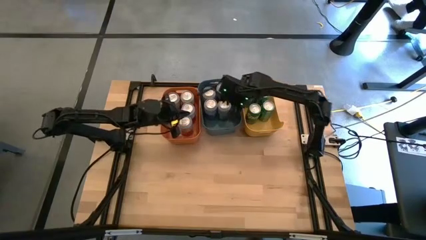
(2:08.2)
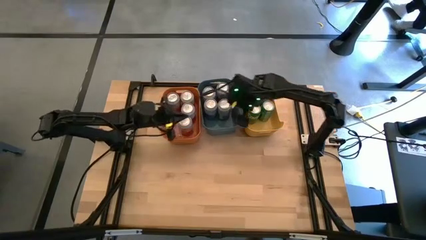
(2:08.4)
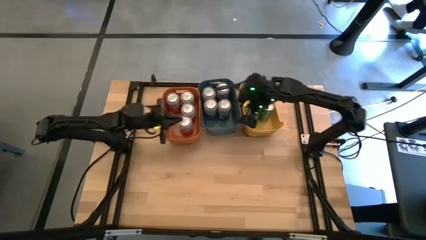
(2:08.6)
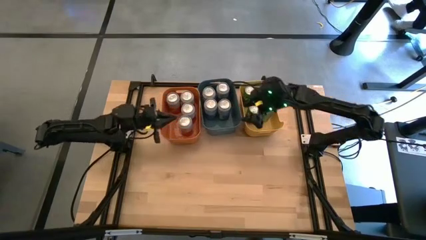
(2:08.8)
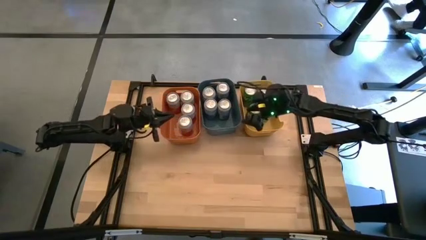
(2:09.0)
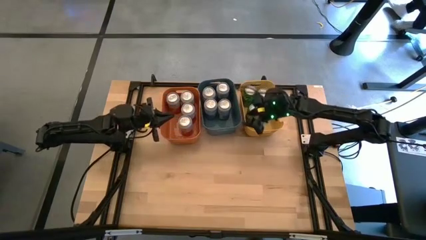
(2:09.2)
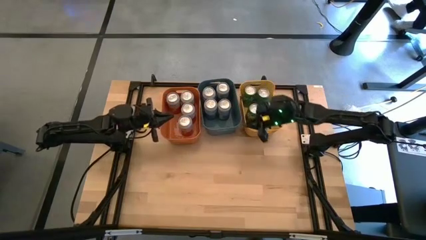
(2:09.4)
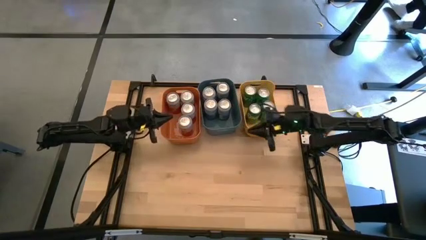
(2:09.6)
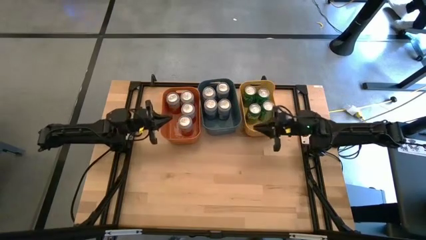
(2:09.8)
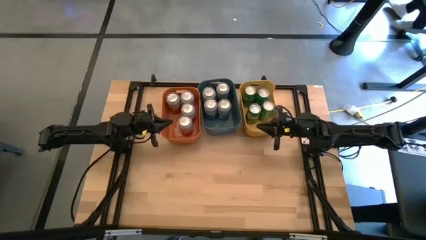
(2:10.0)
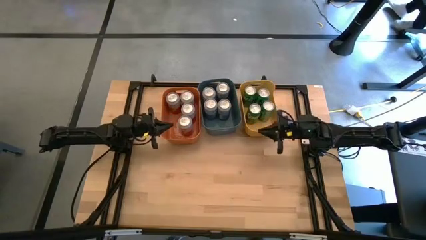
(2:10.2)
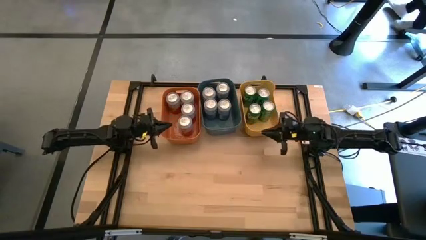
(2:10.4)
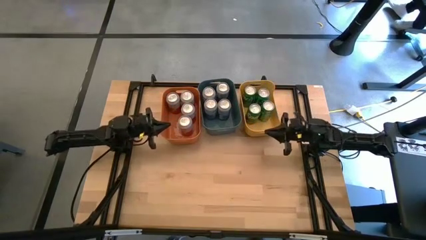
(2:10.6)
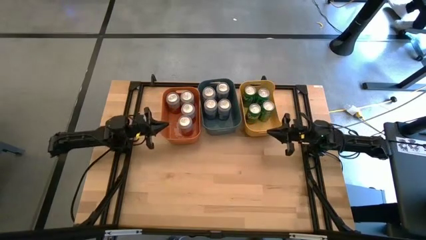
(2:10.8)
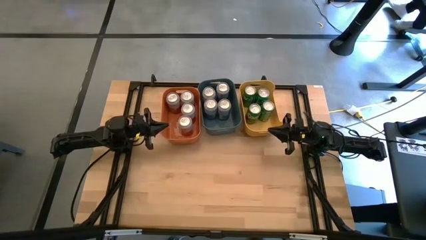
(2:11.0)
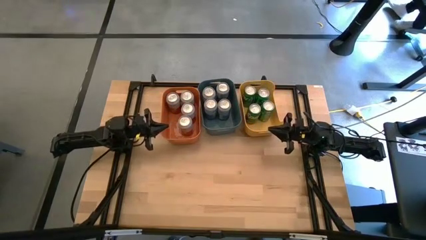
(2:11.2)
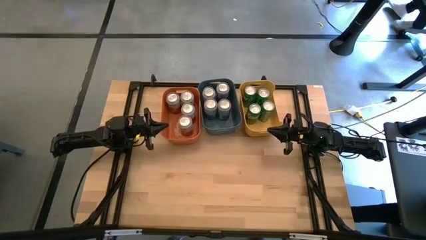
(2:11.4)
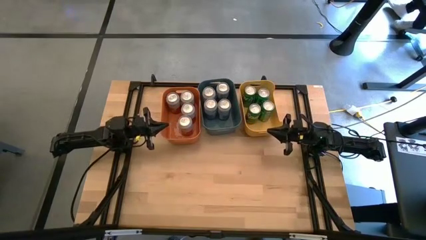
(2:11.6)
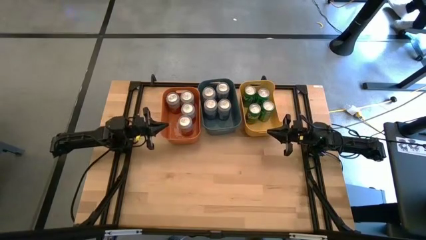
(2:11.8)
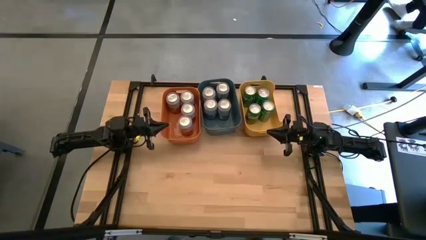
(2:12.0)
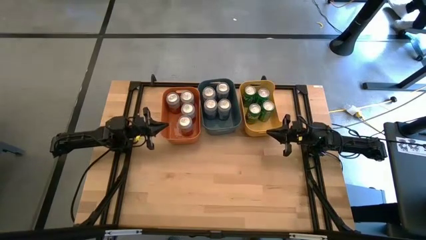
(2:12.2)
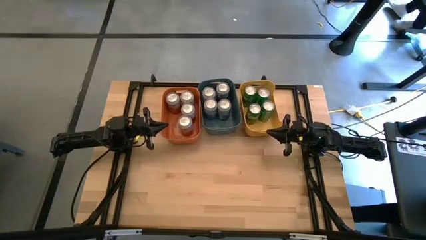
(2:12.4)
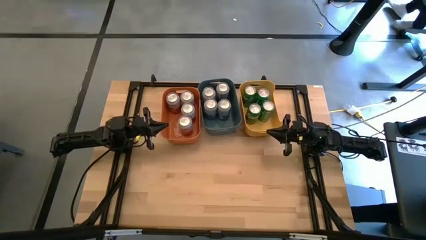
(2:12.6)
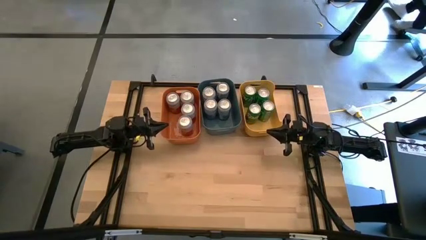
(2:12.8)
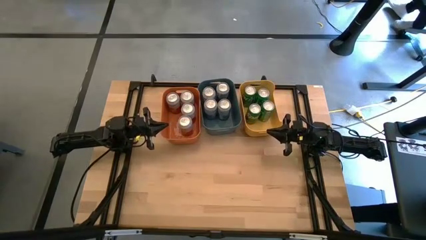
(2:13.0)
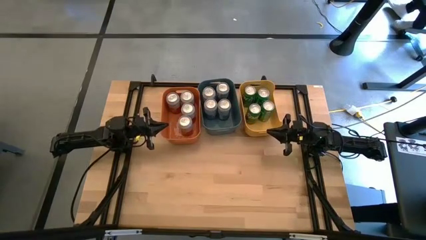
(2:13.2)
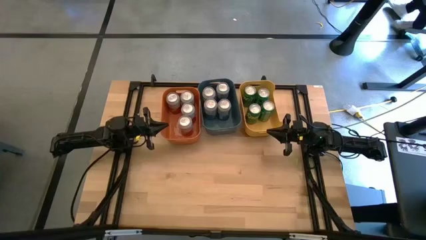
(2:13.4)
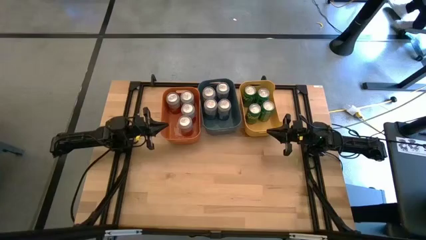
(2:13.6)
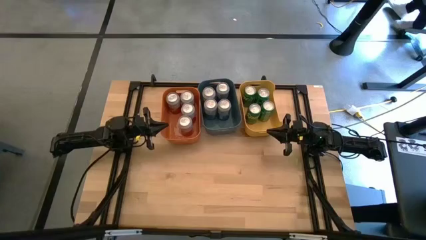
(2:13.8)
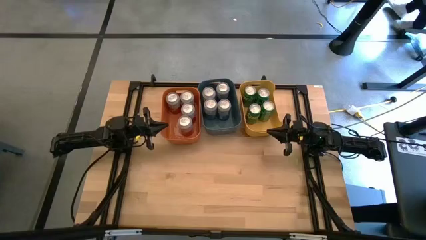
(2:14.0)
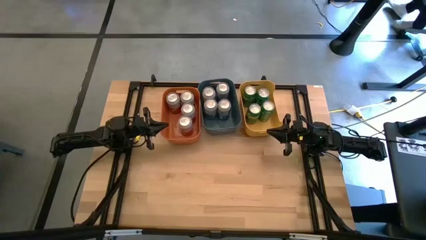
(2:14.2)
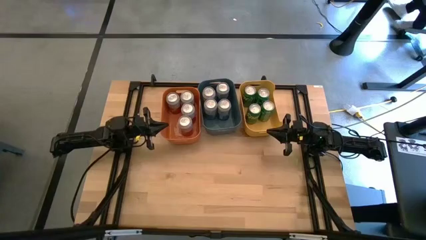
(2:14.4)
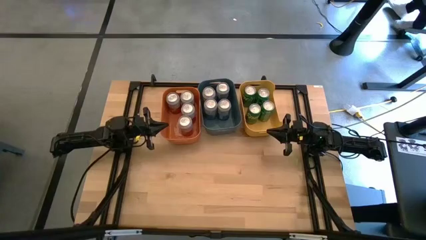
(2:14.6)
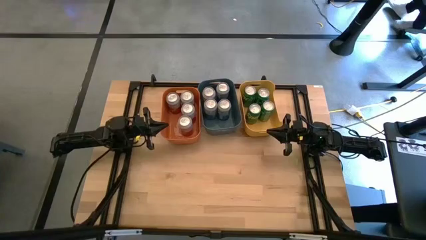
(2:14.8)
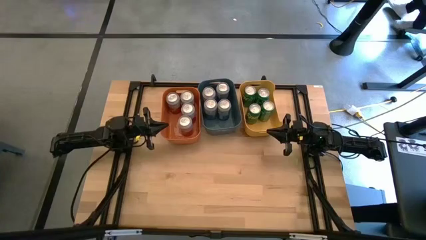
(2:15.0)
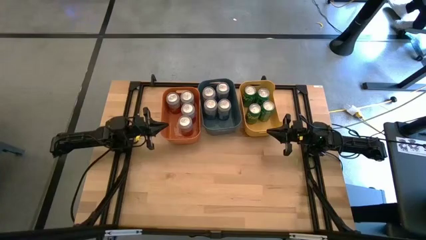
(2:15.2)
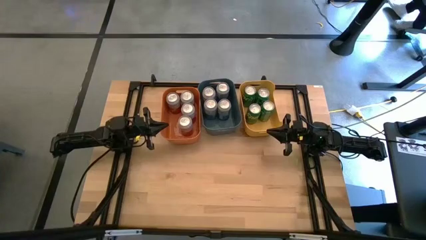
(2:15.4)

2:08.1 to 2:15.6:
Task: Sort soda cans
Return to Home Position
